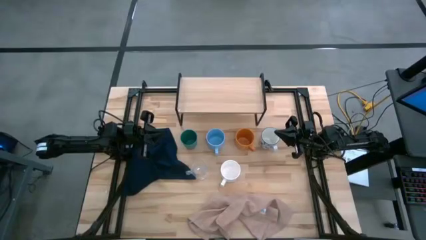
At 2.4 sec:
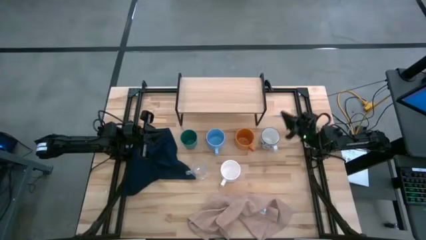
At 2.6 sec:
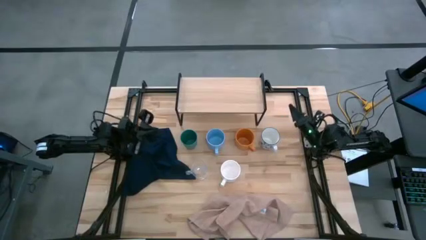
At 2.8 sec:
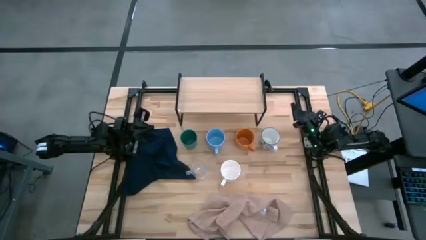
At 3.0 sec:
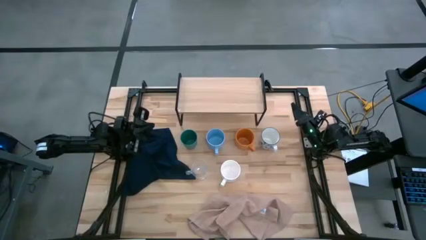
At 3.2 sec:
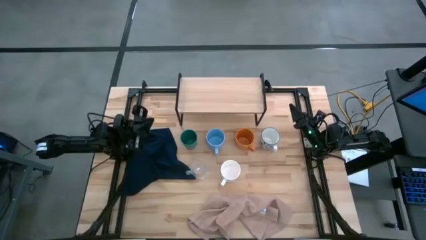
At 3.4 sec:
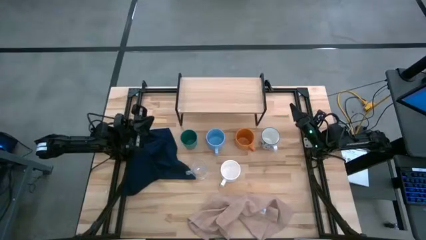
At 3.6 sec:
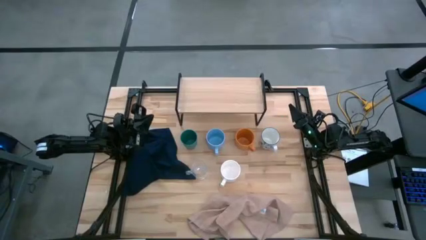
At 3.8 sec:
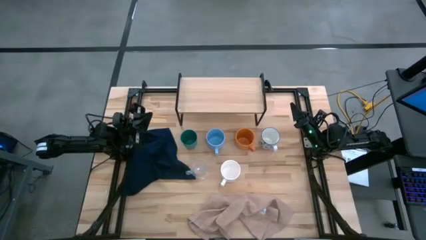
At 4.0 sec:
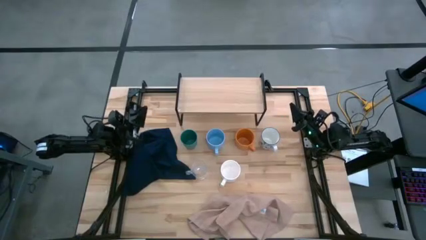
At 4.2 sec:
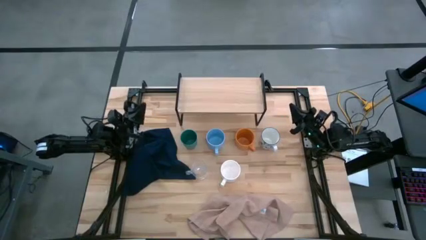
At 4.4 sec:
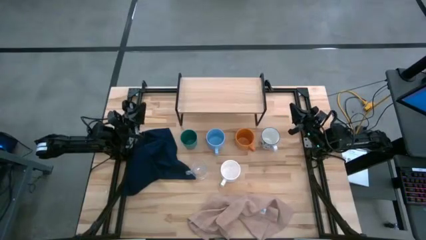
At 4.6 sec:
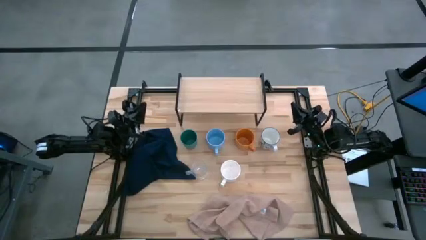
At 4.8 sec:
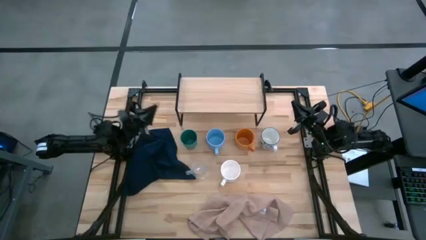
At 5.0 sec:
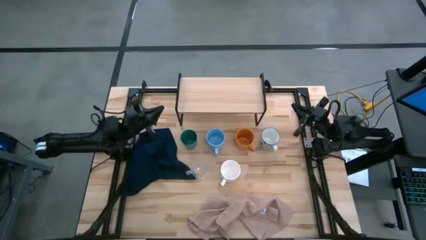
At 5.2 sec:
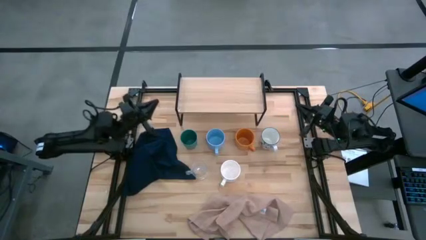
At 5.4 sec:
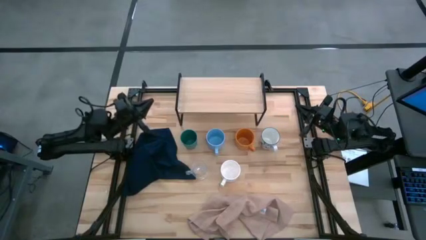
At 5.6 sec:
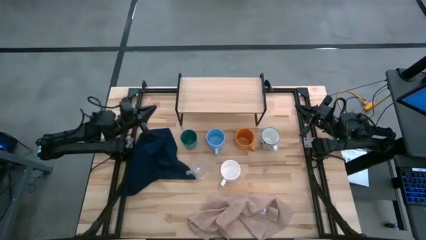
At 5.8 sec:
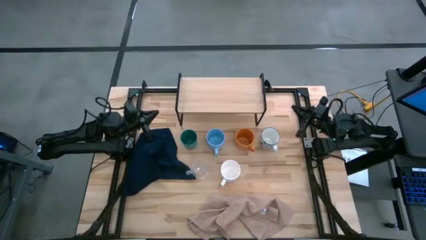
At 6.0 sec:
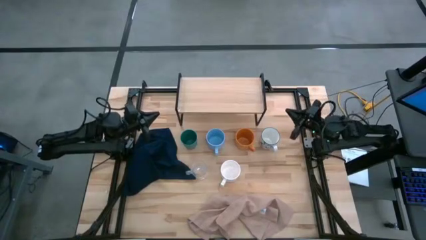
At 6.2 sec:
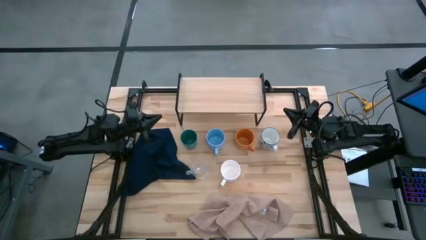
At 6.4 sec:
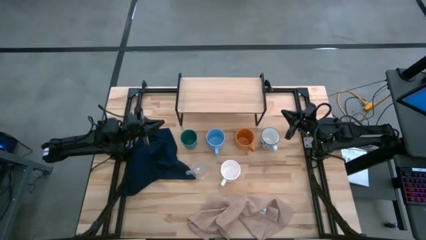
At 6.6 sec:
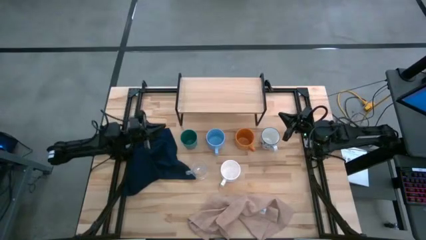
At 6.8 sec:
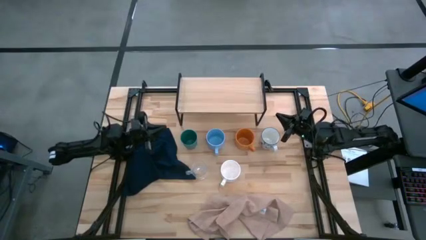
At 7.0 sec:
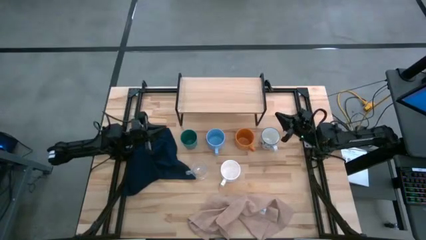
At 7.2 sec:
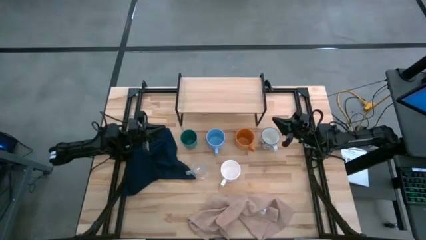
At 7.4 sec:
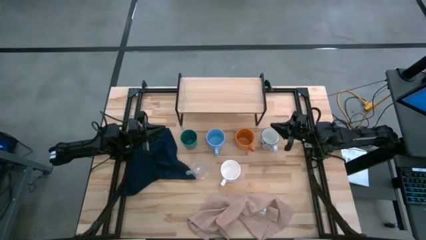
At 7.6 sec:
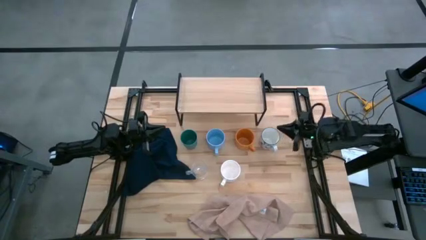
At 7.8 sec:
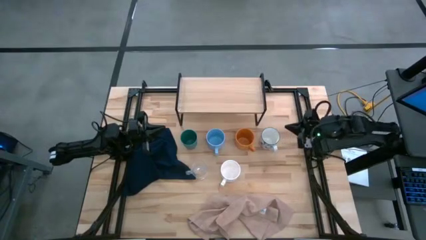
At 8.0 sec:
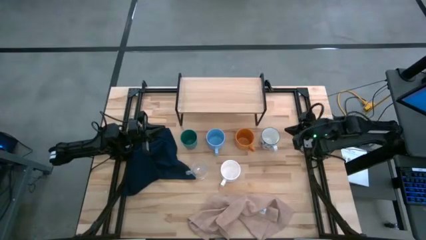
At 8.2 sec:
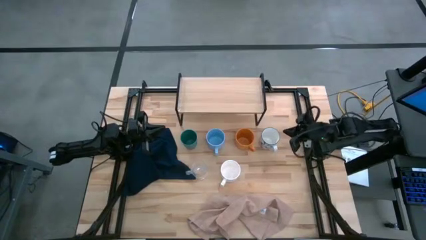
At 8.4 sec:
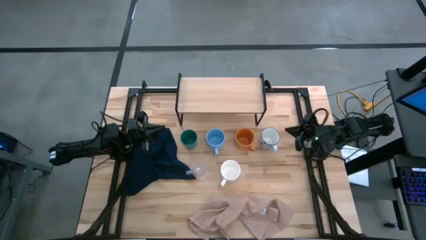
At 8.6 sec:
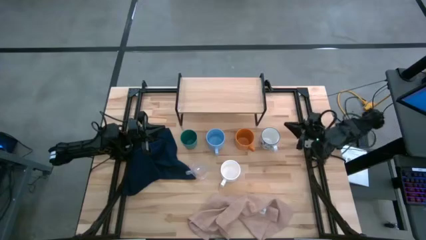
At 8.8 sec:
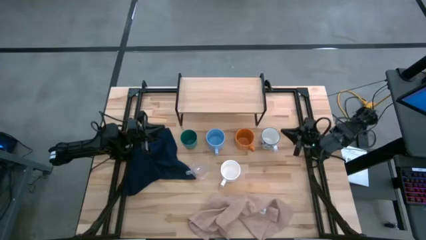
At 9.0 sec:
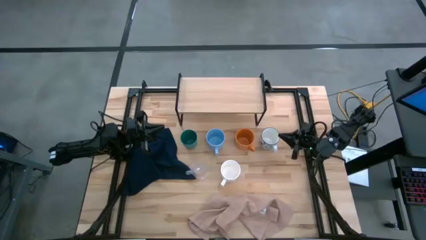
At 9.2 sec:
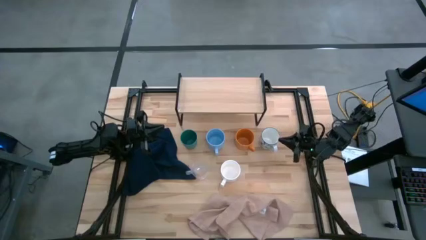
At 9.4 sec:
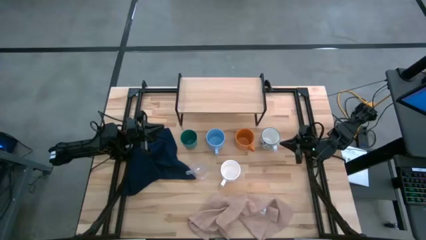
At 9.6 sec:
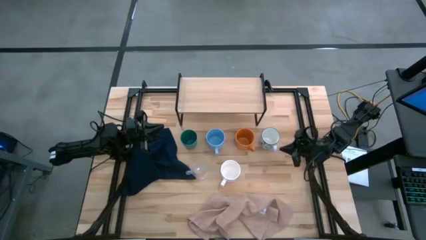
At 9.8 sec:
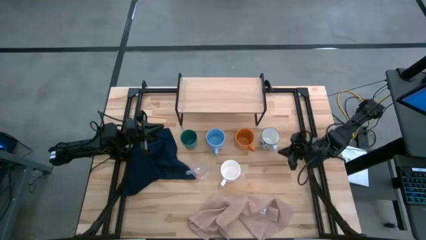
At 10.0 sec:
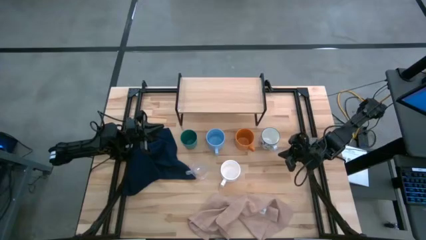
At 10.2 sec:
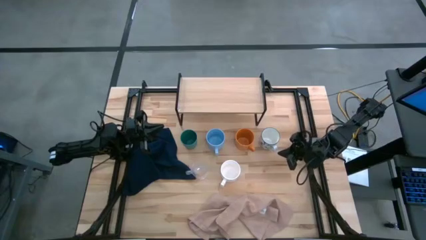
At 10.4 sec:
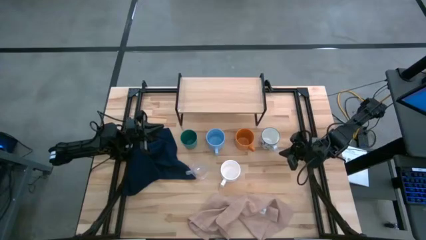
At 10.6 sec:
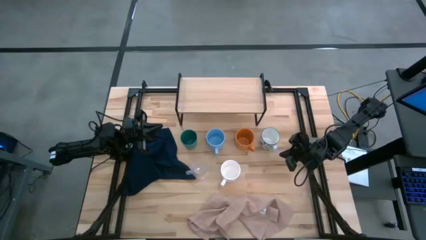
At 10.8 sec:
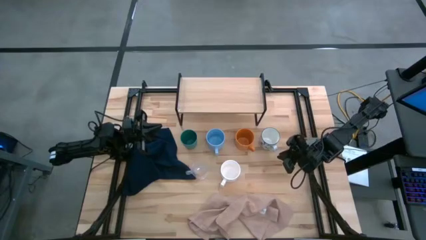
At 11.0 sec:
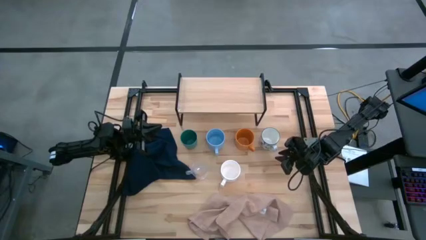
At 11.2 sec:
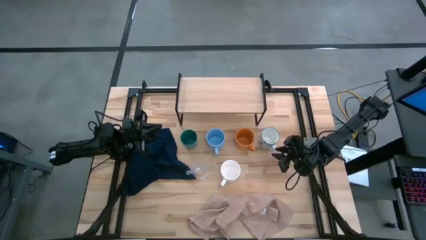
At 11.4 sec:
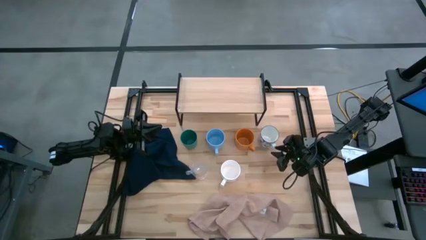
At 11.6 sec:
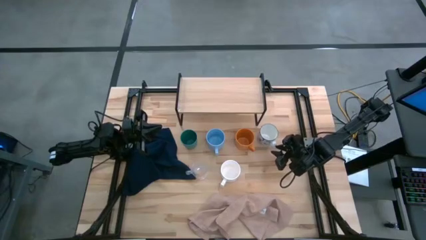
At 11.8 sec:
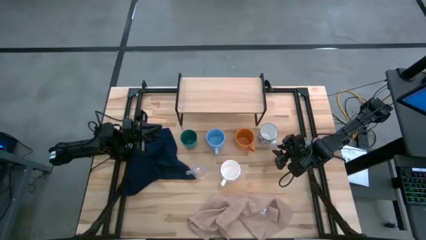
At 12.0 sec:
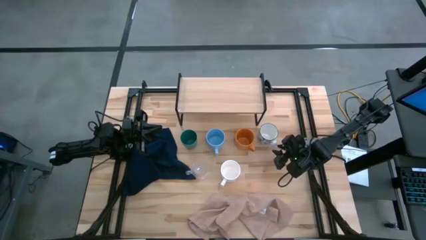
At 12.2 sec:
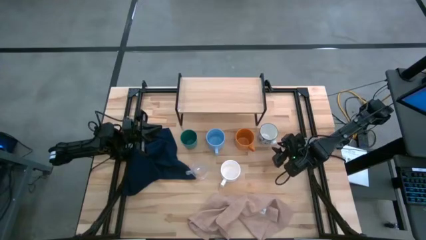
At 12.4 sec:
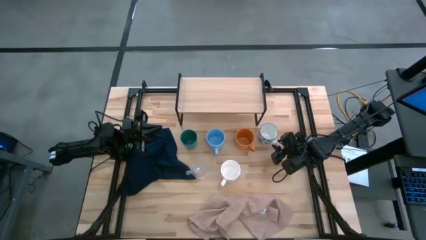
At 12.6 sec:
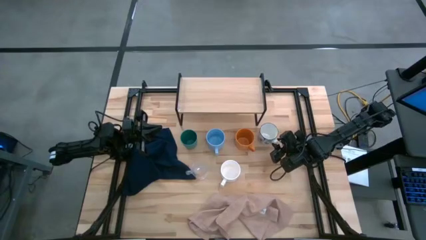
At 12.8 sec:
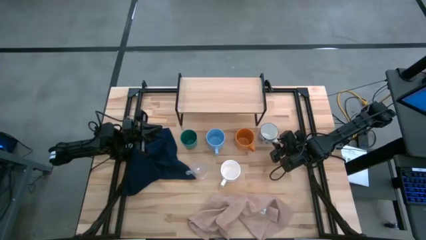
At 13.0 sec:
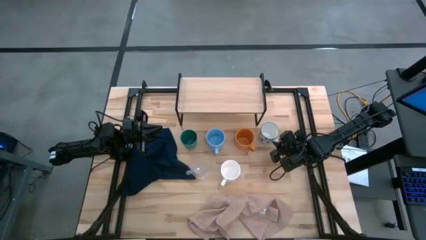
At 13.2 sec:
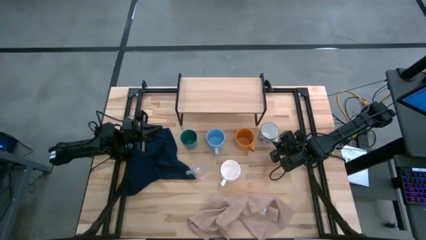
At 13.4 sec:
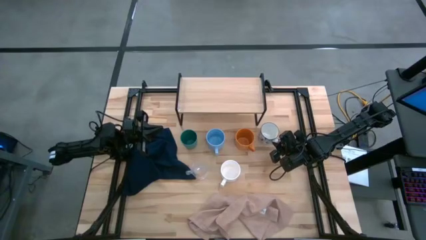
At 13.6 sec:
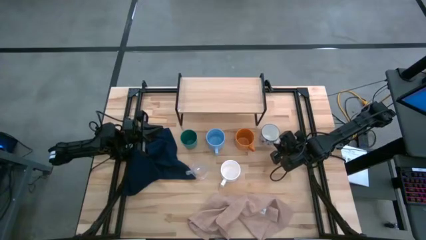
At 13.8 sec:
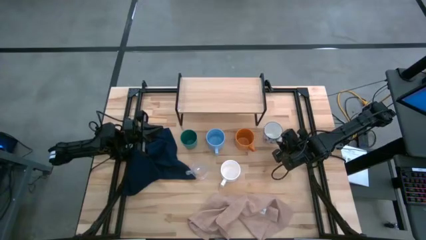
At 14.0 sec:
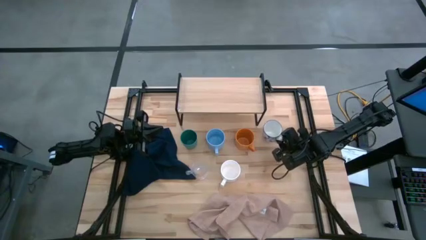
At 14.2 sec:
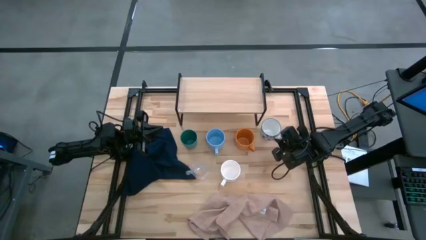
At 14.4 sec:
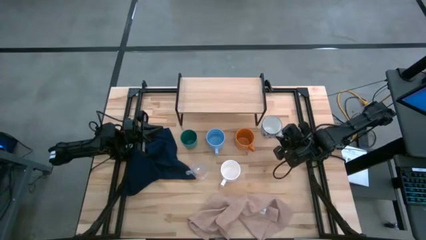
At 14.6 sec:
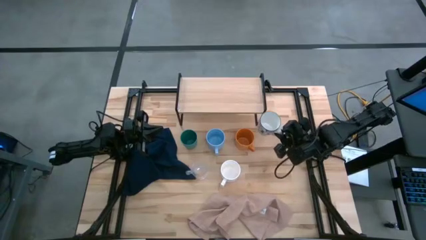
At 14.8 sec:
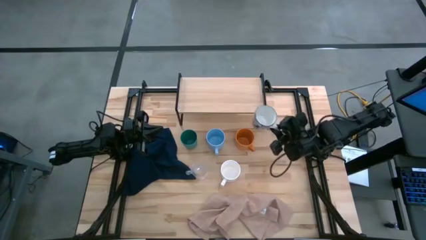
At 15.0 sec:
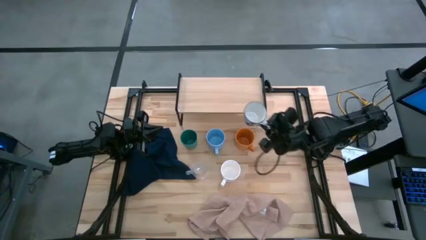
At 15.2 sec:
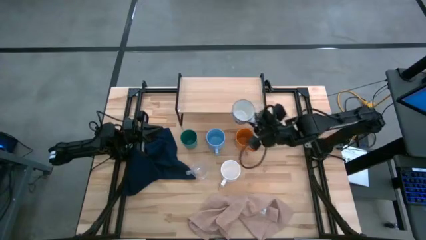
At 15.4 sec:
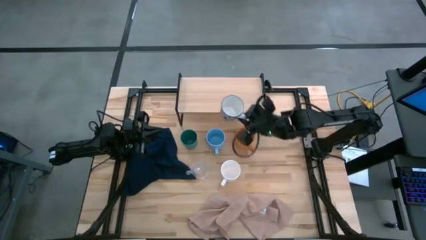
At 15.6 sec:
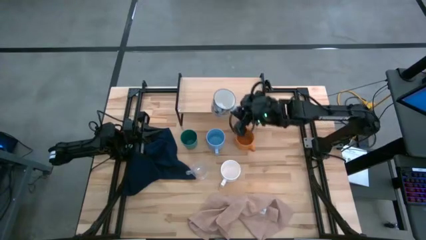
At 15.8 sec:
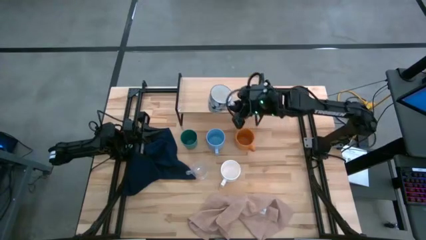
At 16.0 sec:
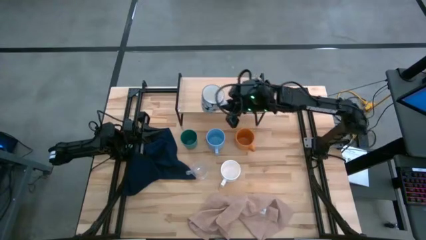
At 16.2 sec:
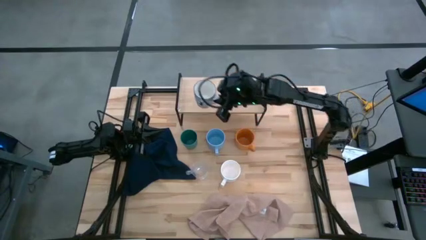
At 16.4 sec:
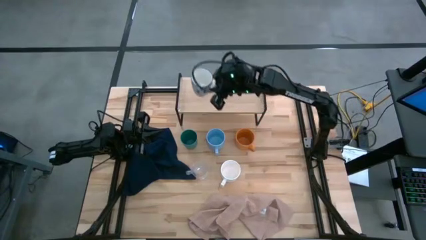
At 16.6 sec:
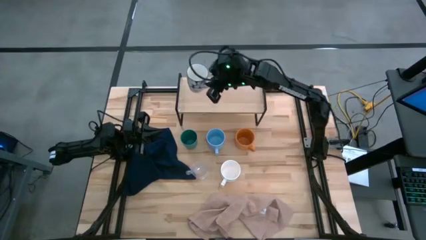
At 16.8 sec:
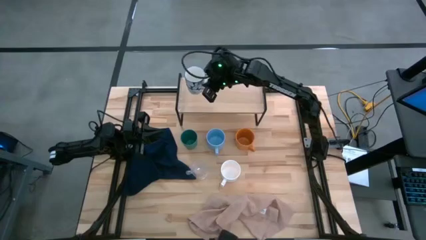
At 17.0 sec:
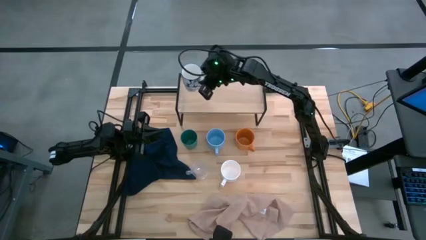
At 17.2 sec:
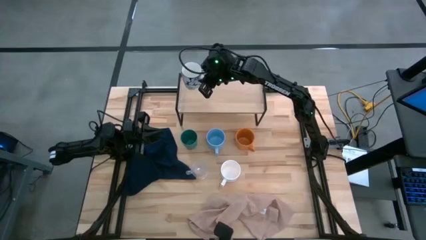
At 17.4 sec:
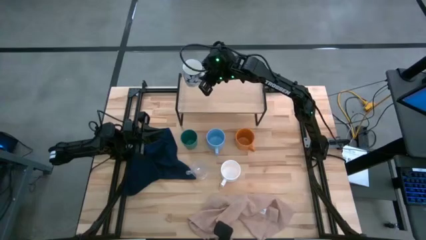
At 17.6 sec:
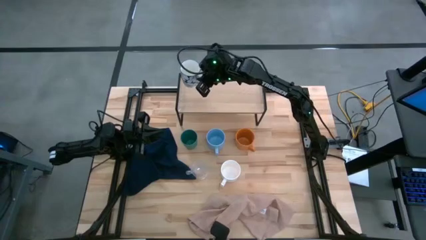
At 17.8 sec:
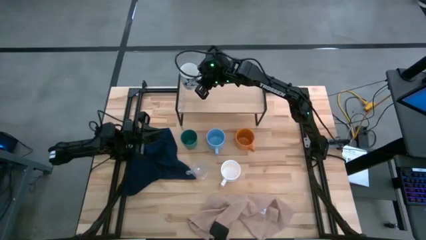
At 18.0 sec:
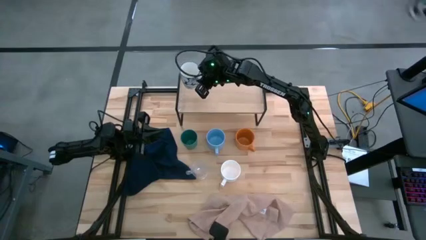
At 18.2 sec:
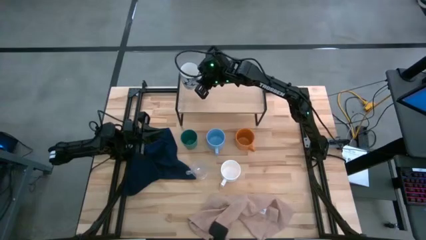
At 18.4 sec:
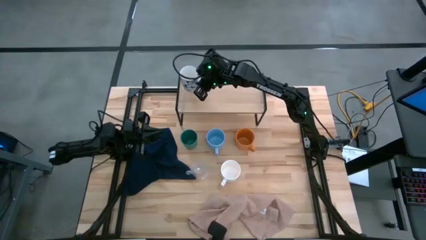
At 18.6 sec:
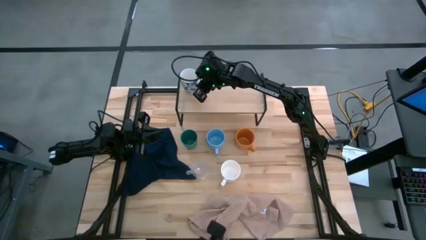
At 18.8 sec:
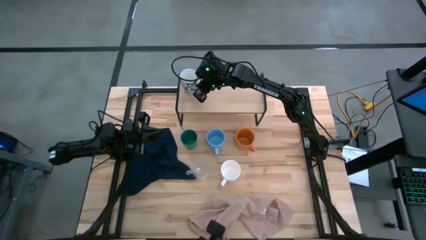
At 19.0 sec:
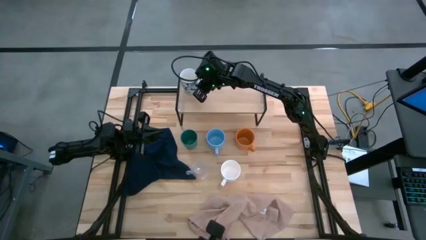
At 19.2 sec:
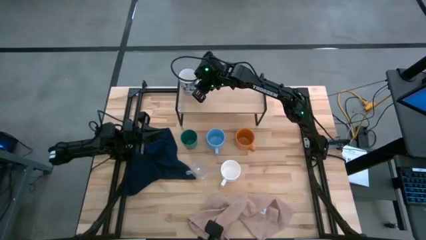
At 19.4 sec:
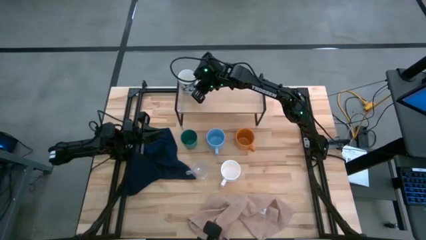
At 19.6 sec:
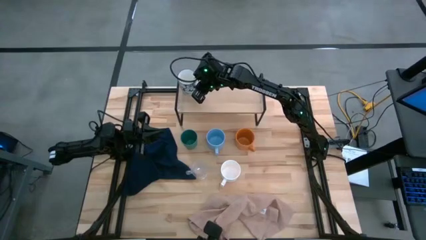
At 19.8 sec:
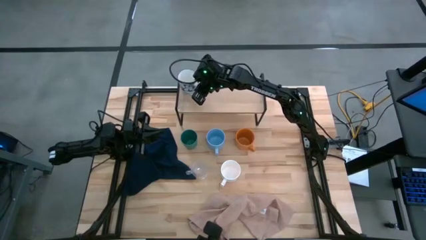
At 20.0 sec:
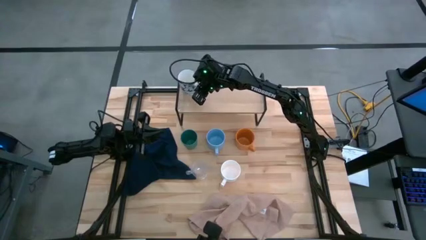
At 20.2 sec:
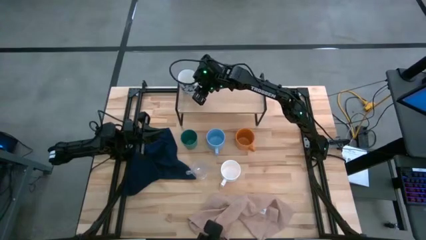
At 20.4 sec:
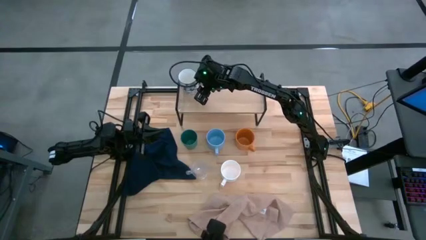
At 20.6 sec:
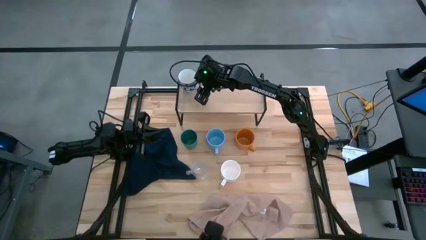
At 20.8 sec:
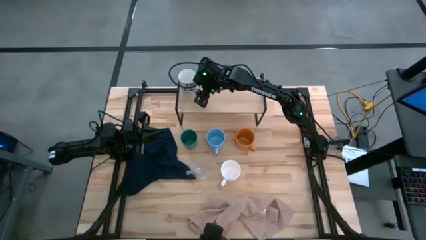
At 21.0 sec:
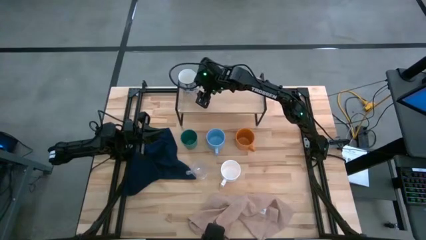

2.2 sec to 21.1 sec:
Task: Stack small to large cups/mugs on shelf
Put the white patterned mug on the shelf
